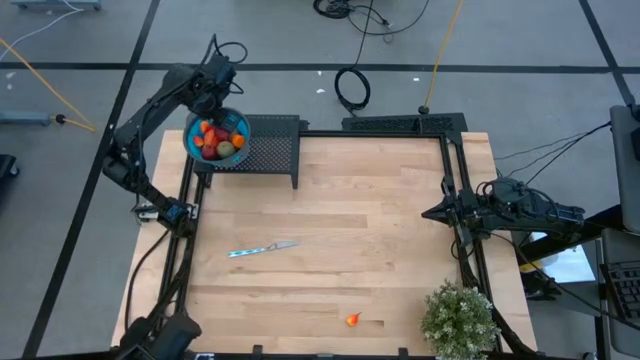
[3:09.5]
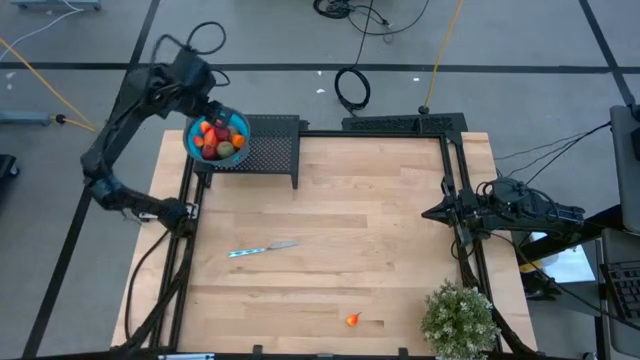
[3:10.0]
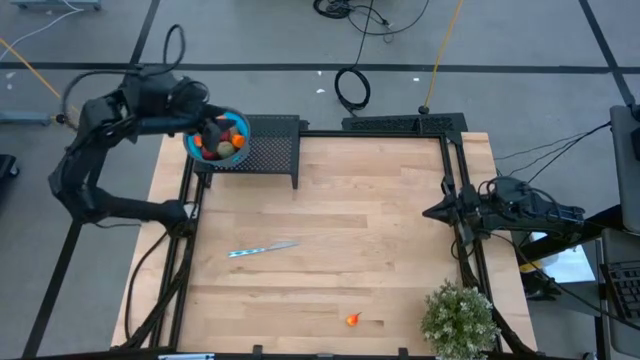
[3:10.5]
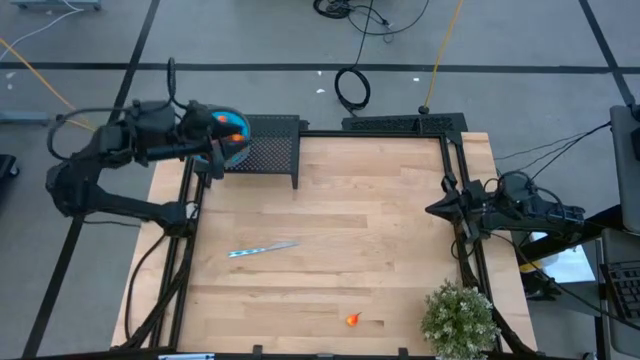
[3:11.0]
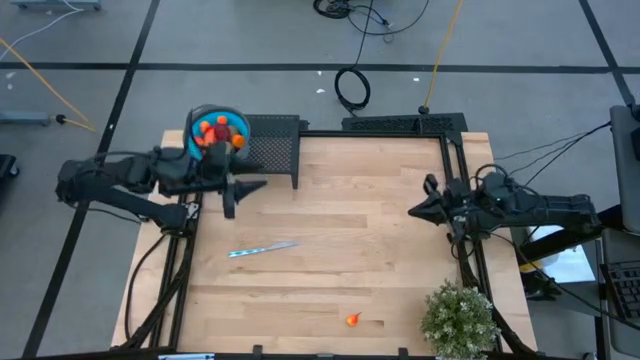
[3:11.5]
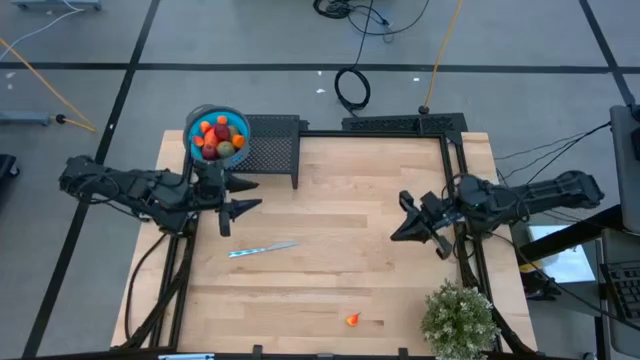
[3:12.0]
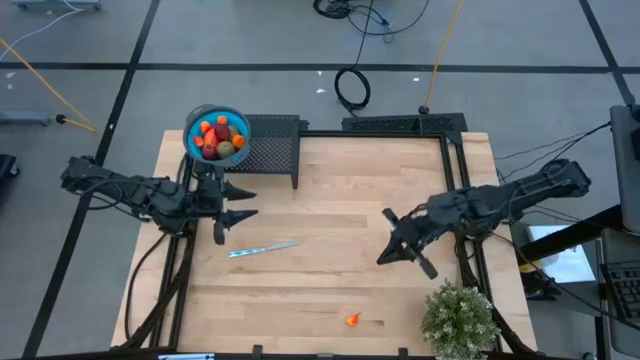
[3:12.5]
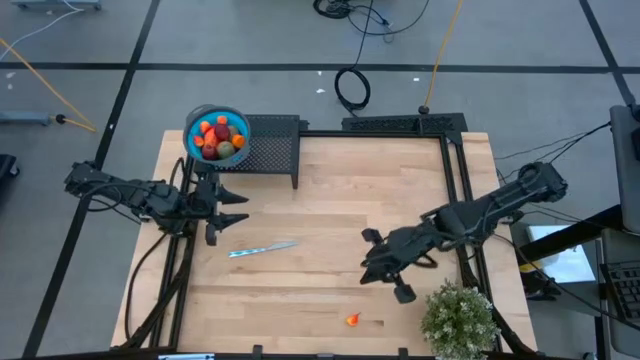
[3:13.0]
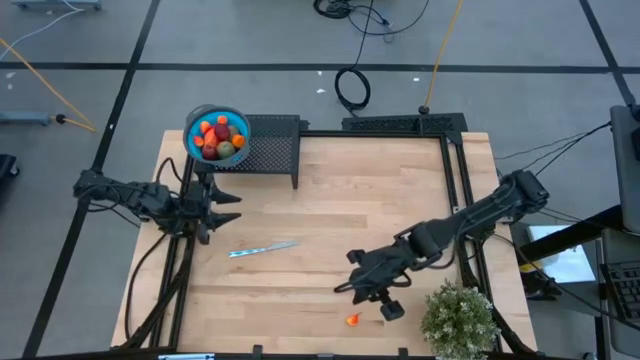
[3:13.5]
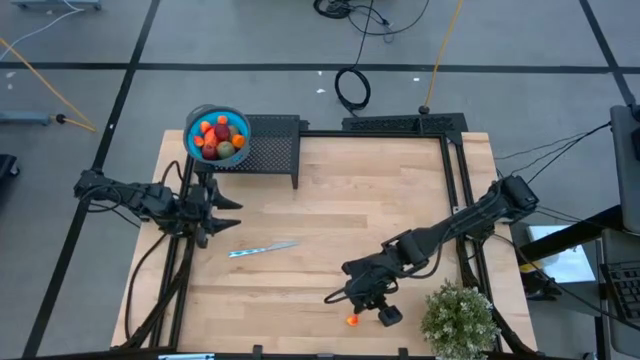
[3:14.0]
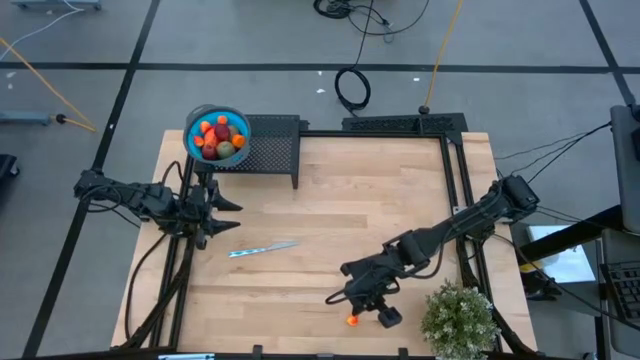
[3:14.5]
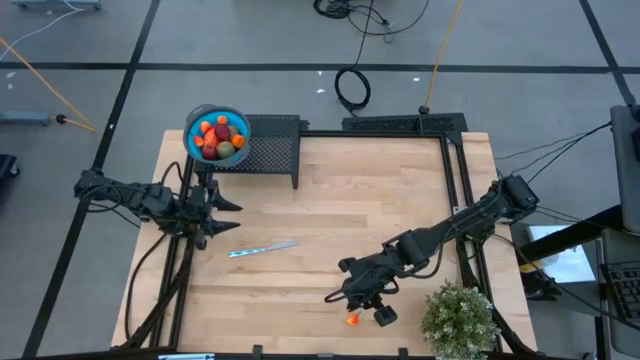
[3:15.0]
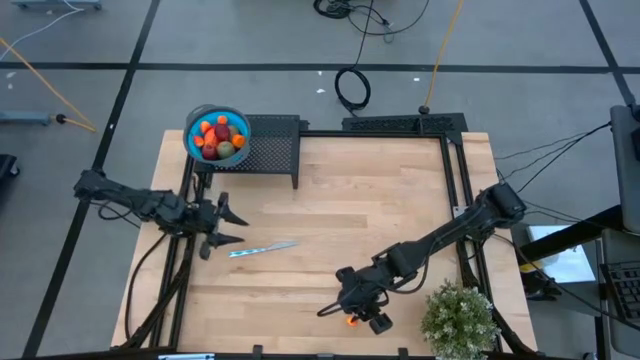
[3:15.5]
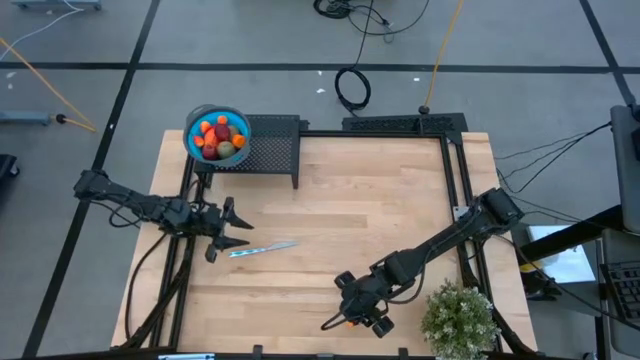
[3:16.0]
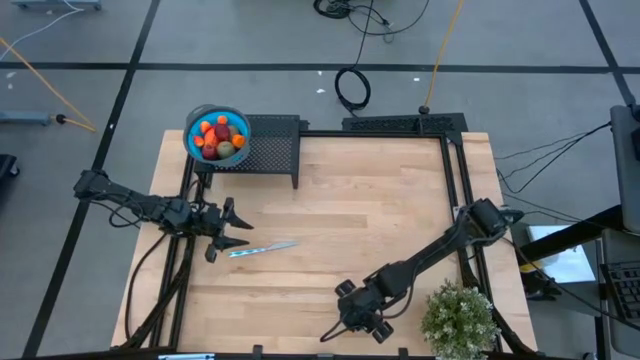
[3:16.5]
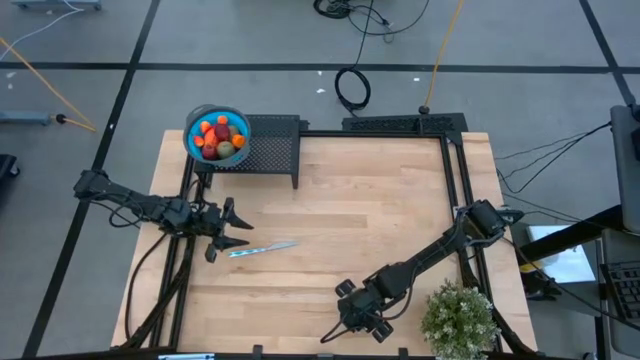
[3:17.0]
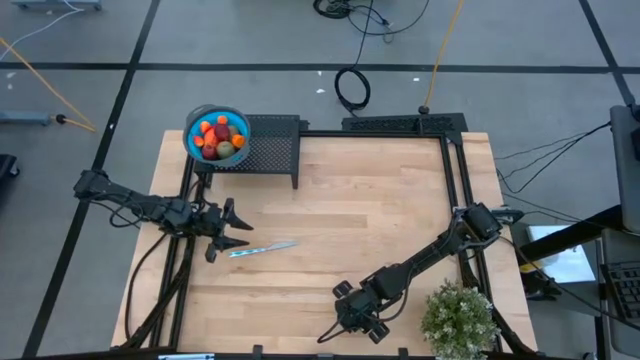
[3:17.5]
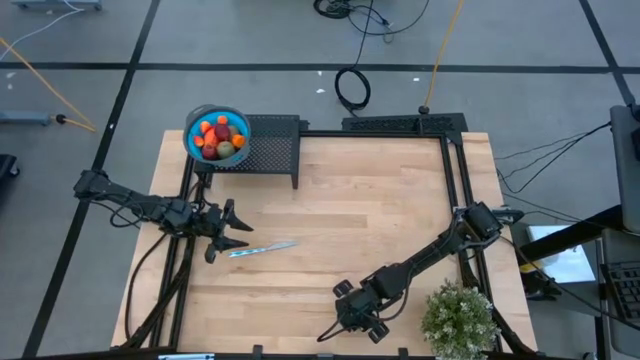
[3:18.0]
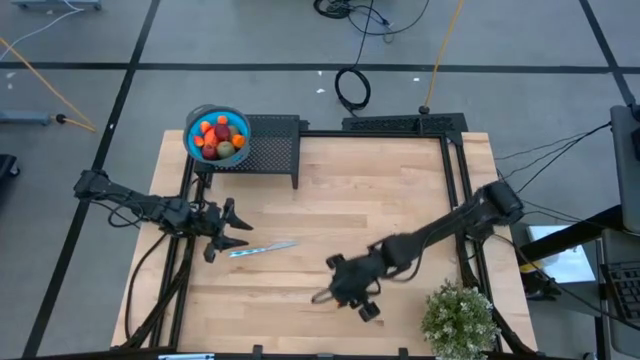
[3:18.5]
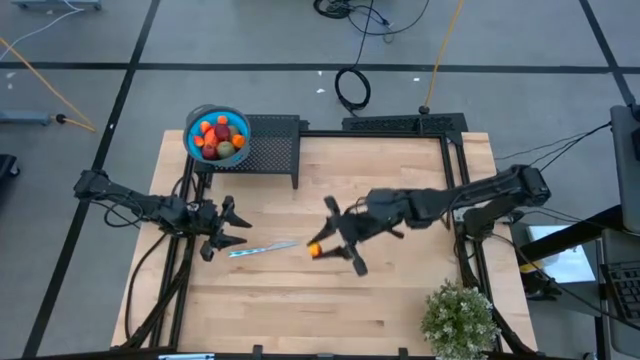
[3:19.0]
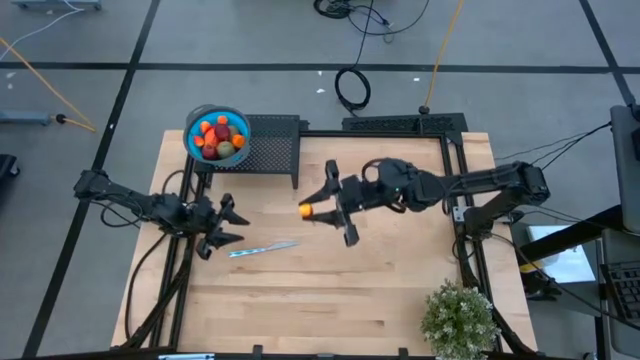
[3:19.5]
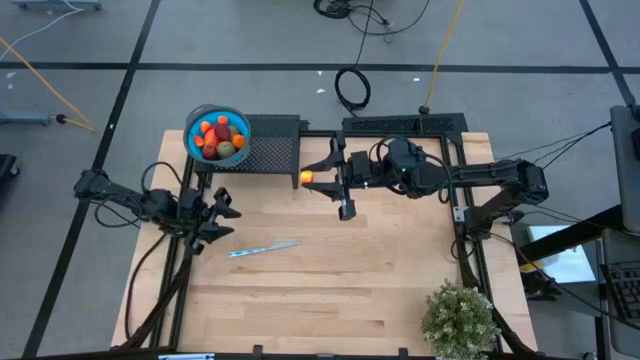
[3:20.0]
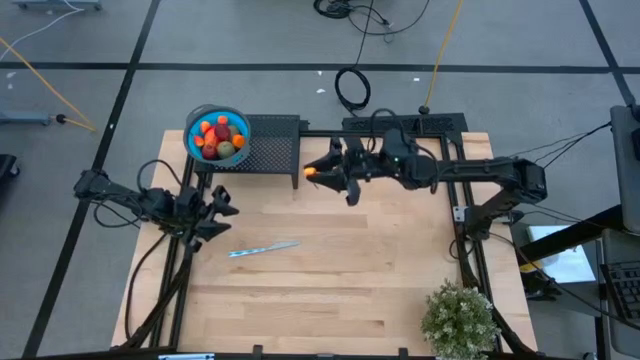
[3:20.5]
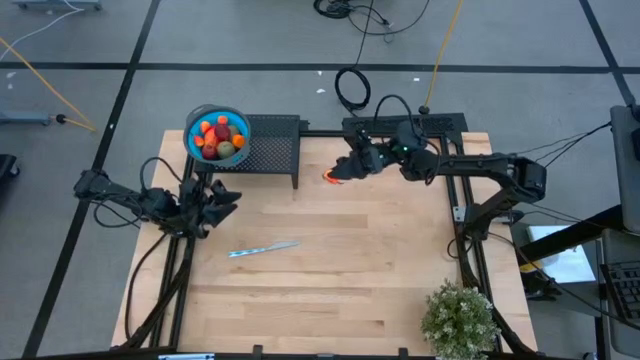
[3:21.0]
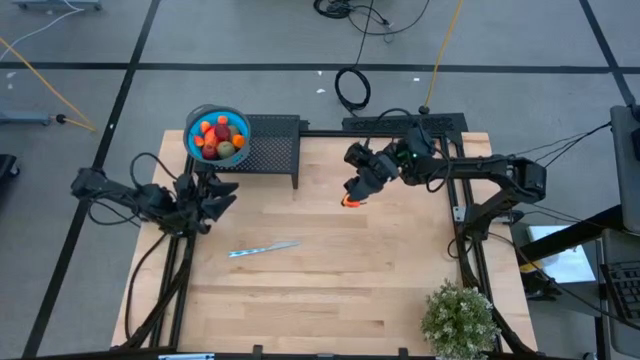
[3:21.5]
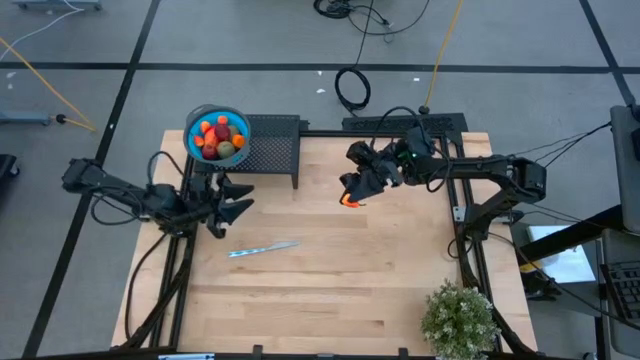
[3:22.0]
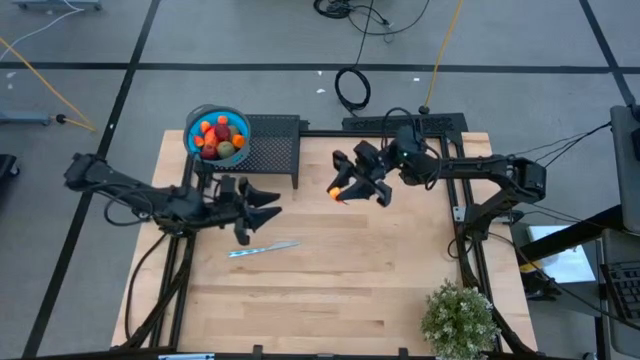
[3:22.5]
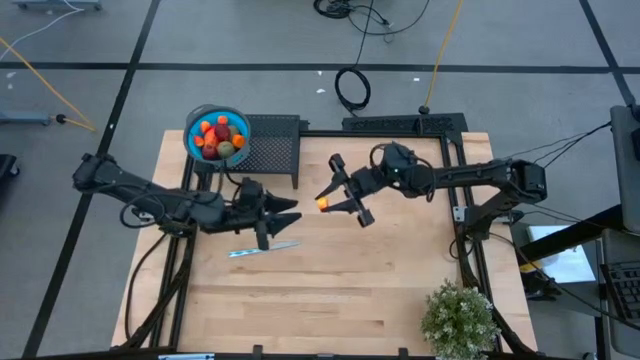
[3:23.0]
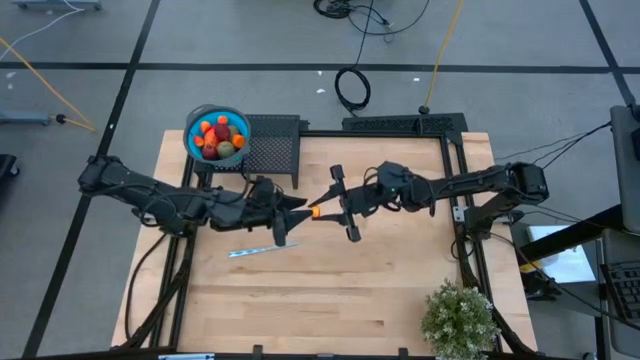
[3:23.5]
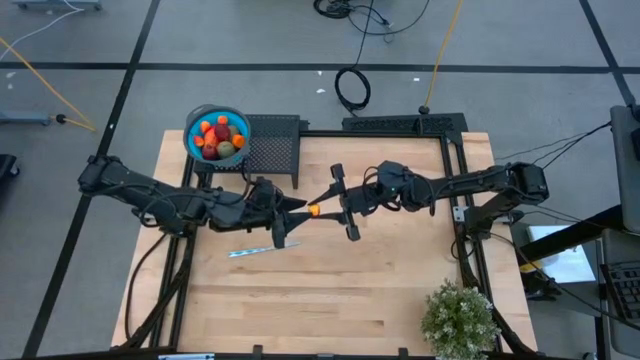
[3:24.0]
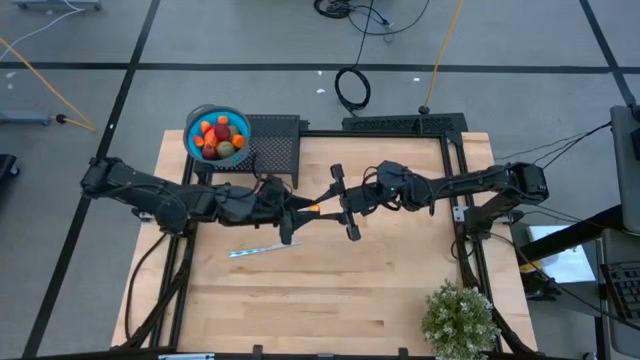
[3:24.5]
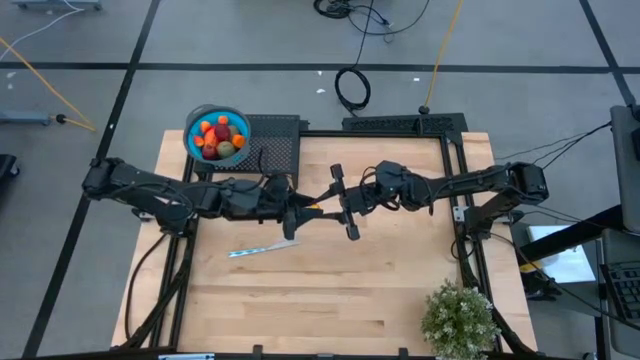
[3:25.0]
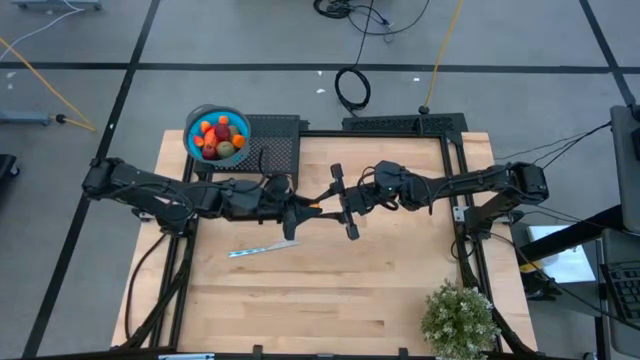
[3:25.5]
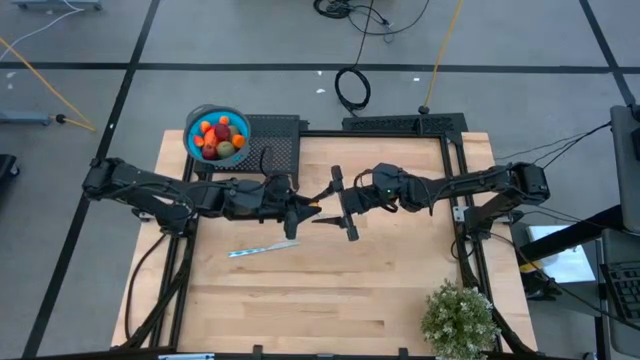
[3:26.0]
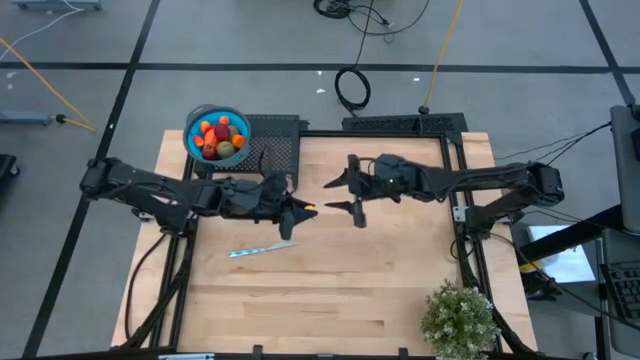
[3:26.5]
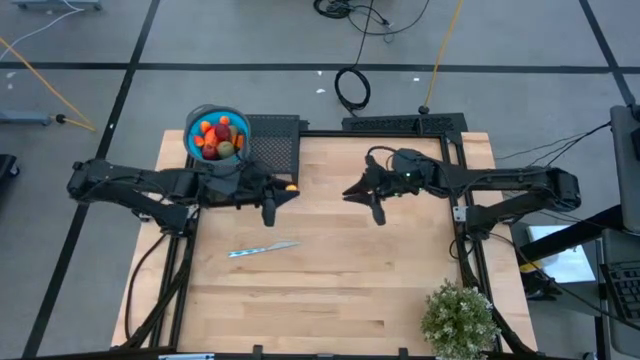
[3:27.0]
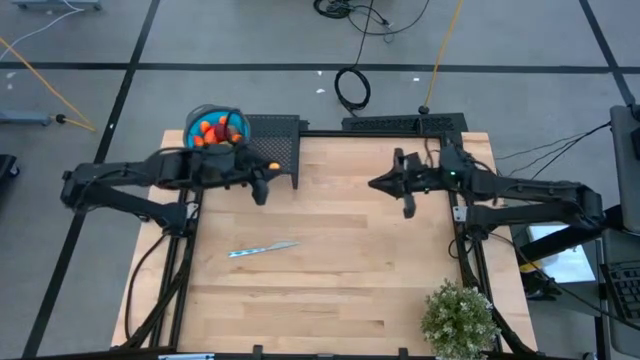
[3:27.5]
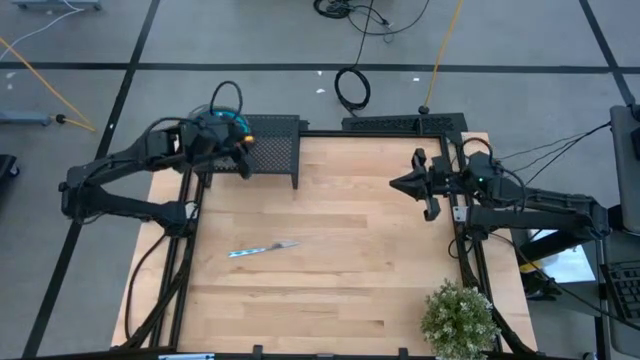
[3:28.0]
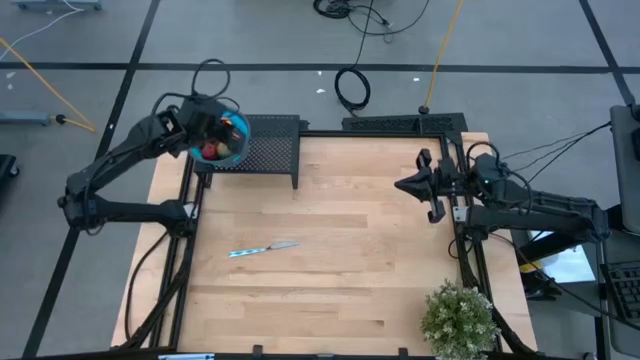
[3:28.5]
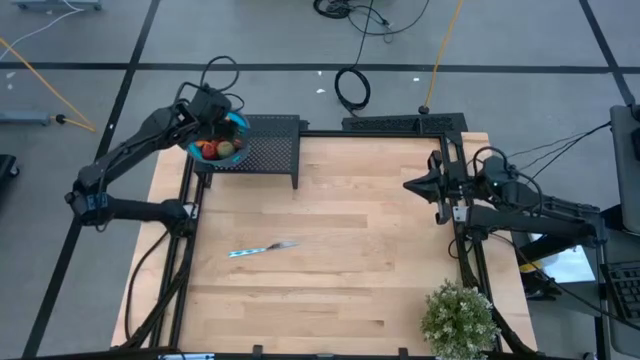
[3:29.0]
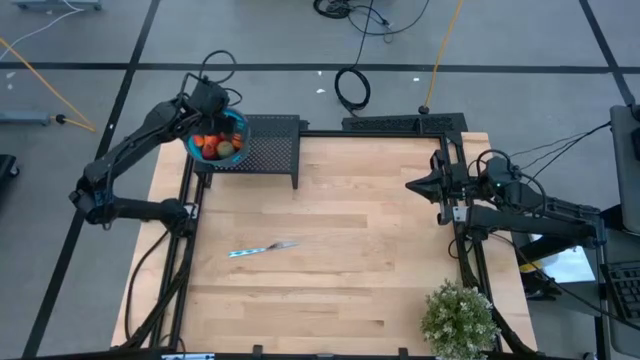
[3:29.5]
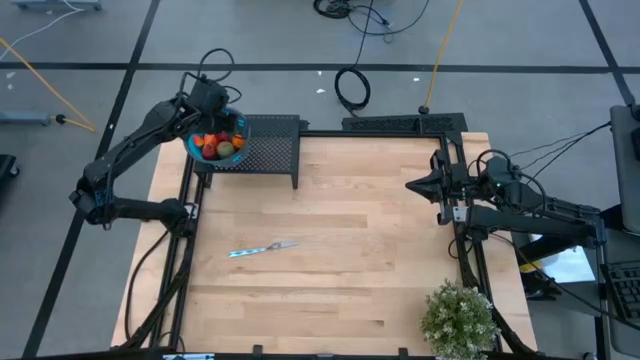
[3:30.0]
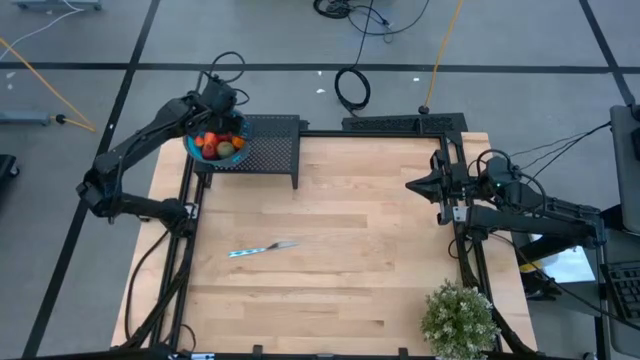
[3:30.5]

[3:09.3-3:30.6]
Task: Pick & Place Fruit
Put the peach into the blue strainer bowl on the shelf

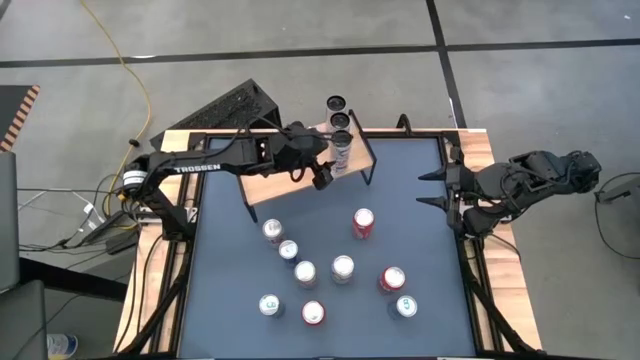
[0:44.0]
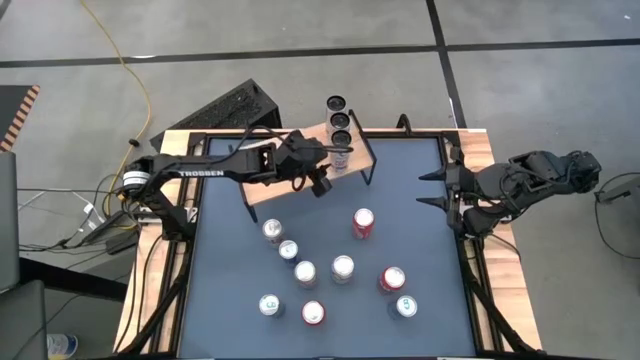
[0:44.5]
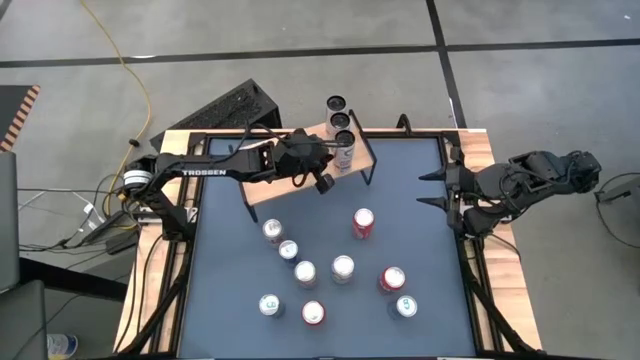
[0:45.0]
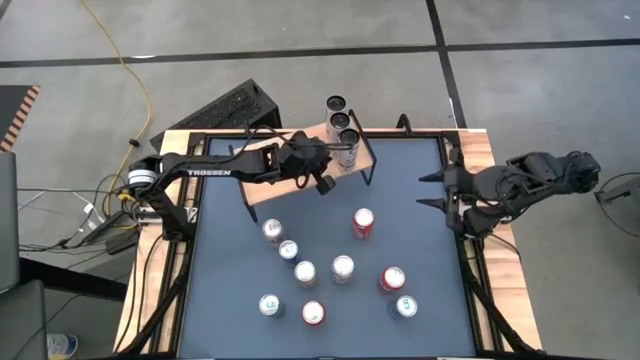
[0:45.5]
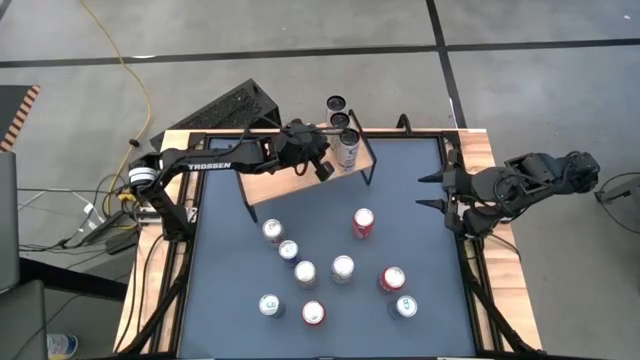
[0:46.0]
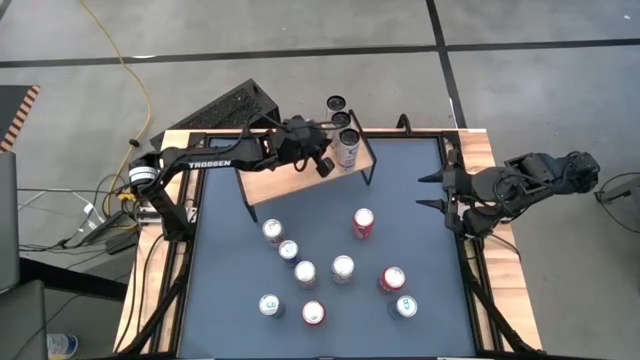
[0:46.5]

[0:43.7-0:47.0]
Task: Place canned beverage on shelf
Adjust the white pink soda can on the shelf
